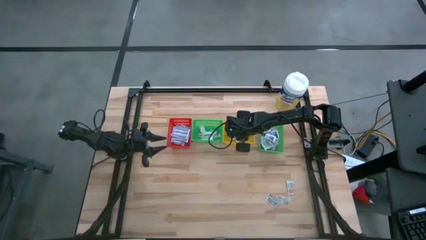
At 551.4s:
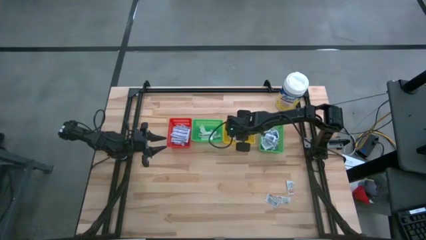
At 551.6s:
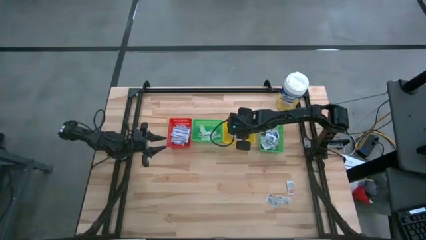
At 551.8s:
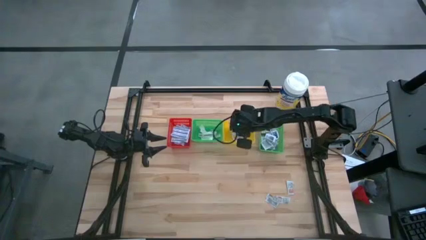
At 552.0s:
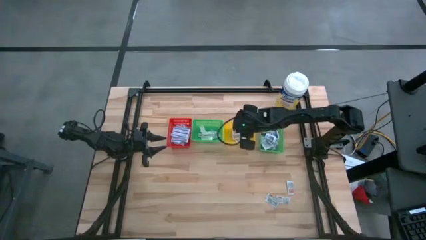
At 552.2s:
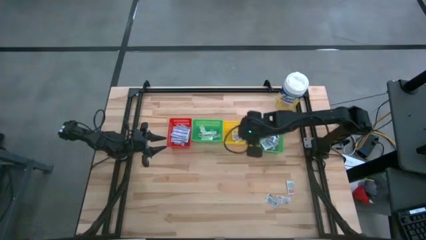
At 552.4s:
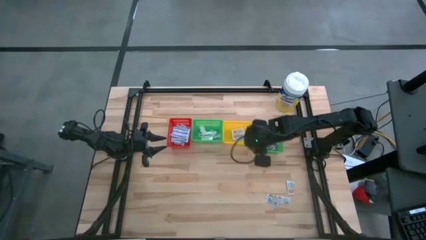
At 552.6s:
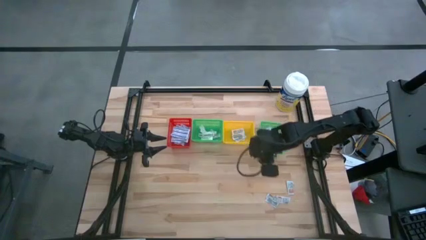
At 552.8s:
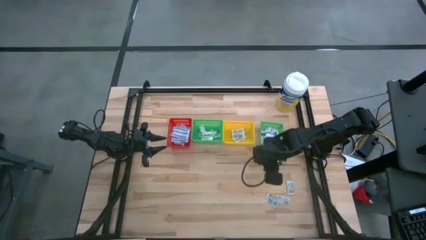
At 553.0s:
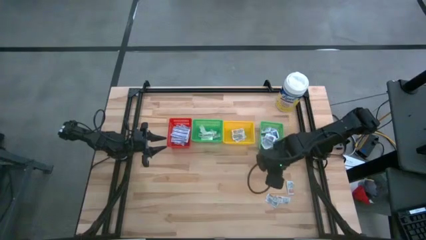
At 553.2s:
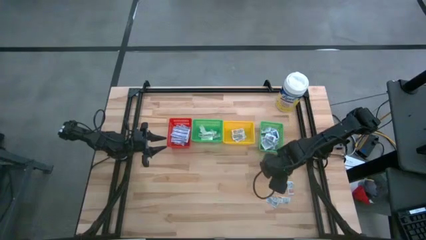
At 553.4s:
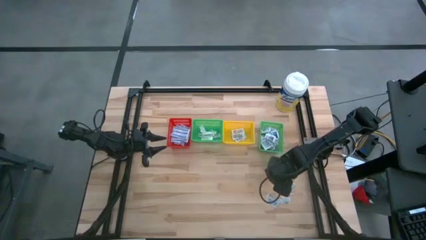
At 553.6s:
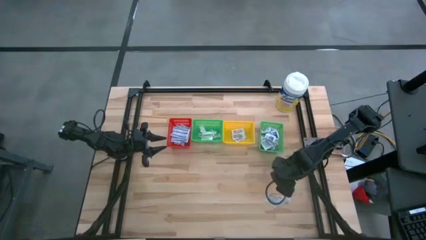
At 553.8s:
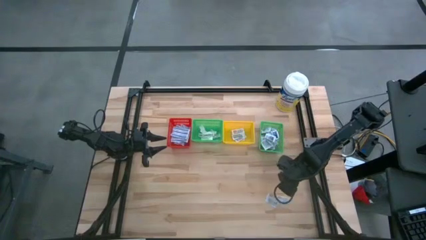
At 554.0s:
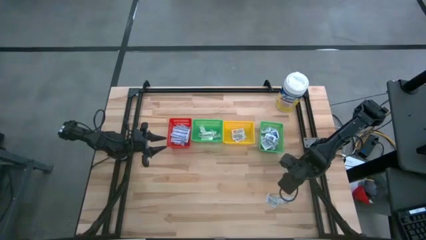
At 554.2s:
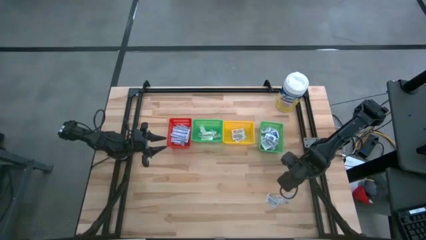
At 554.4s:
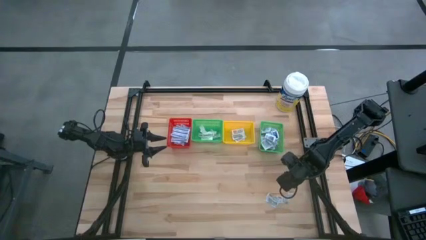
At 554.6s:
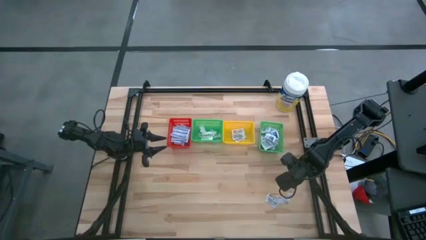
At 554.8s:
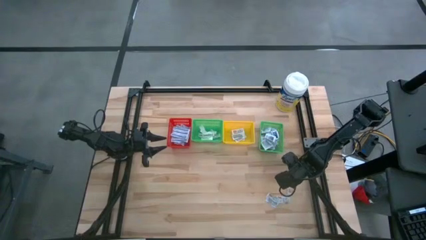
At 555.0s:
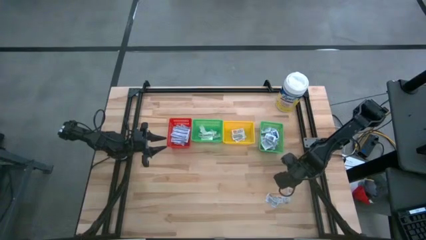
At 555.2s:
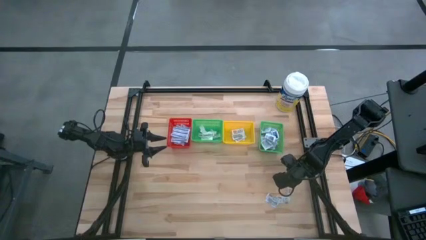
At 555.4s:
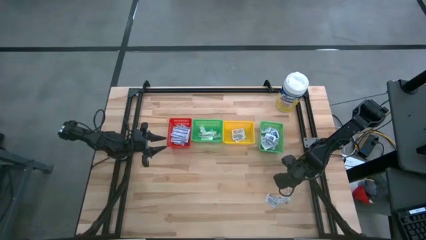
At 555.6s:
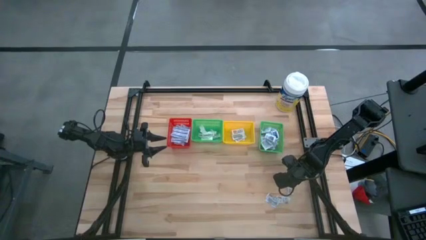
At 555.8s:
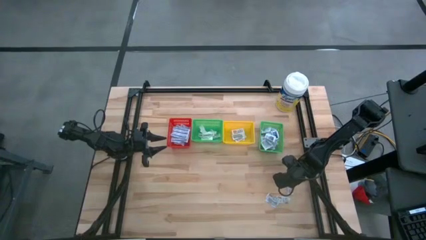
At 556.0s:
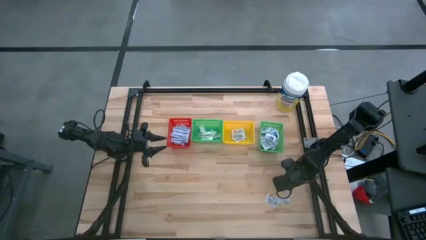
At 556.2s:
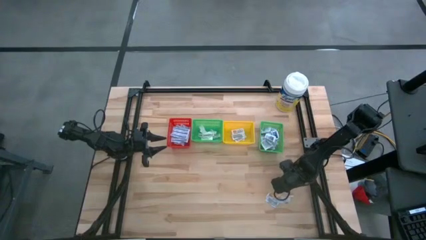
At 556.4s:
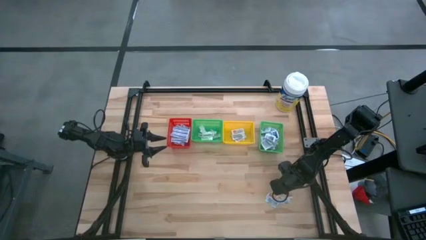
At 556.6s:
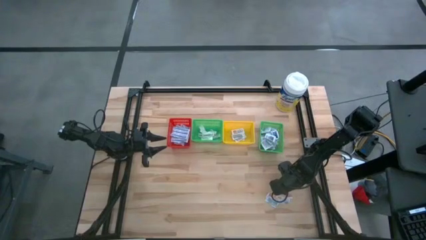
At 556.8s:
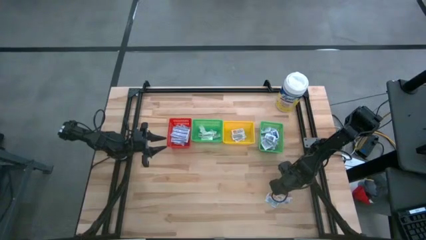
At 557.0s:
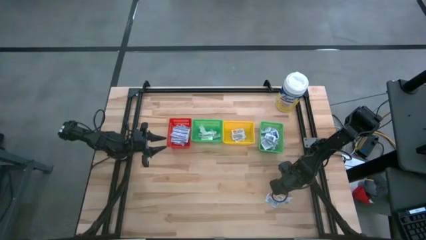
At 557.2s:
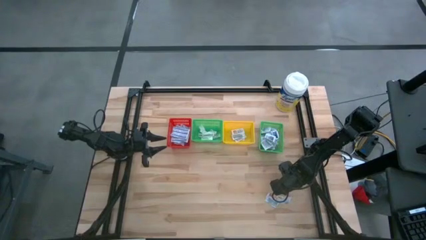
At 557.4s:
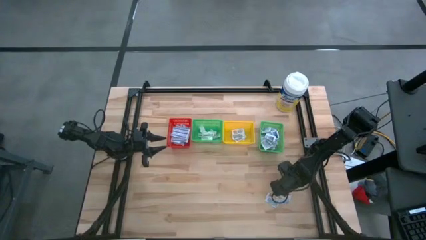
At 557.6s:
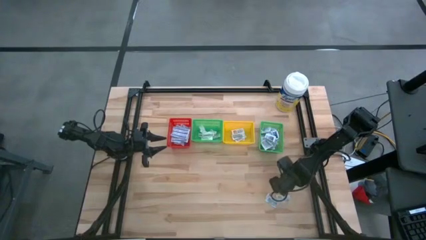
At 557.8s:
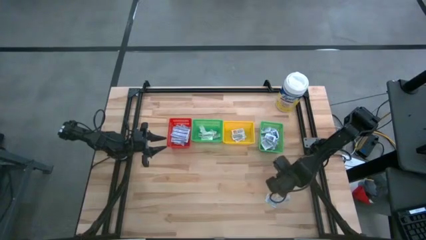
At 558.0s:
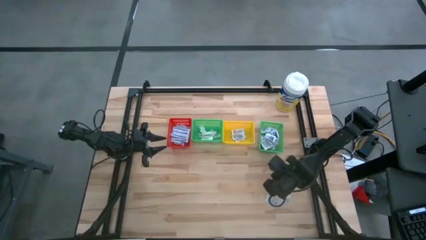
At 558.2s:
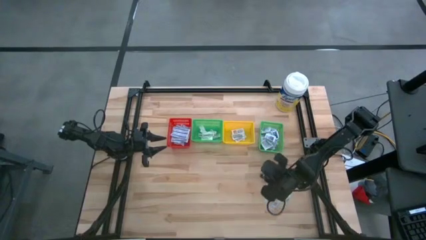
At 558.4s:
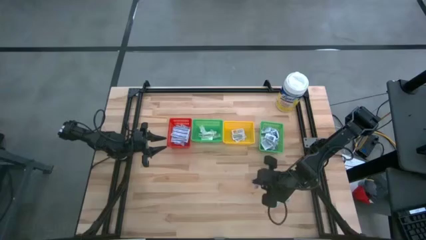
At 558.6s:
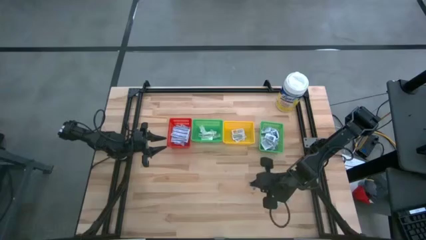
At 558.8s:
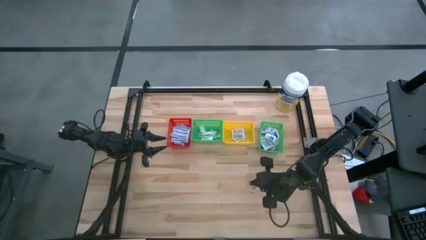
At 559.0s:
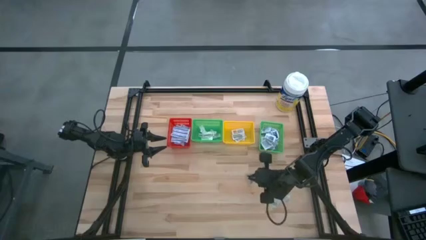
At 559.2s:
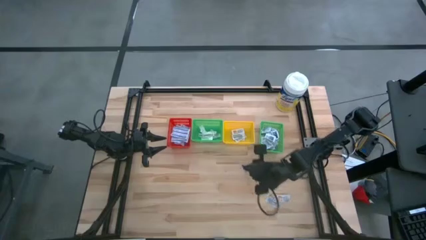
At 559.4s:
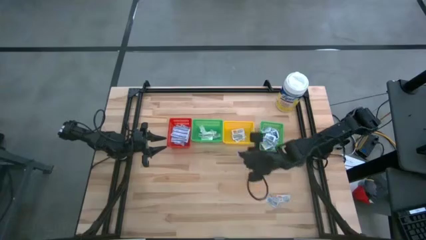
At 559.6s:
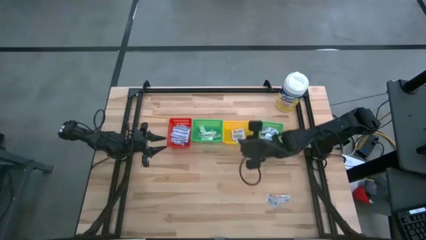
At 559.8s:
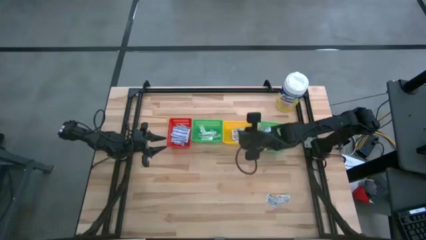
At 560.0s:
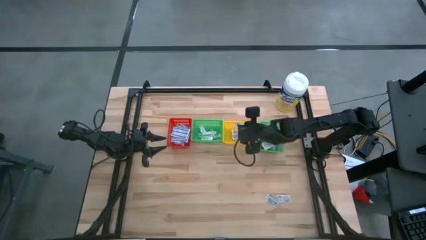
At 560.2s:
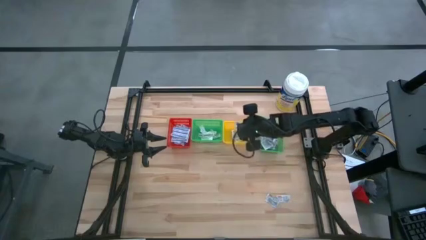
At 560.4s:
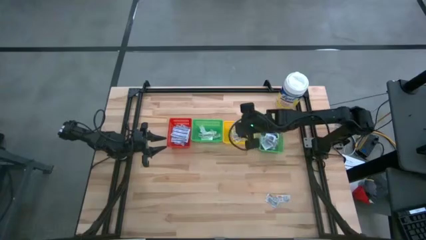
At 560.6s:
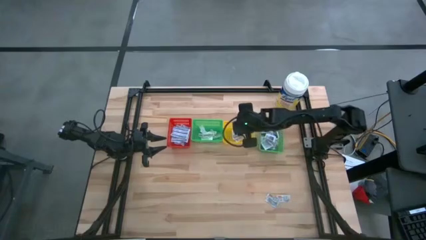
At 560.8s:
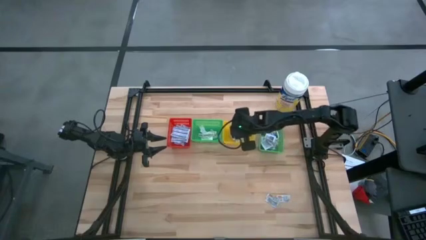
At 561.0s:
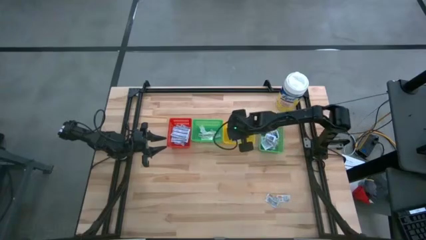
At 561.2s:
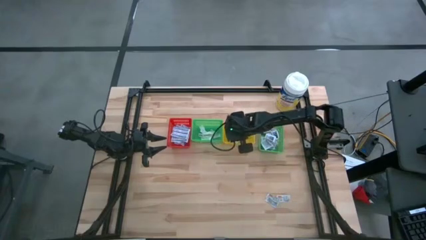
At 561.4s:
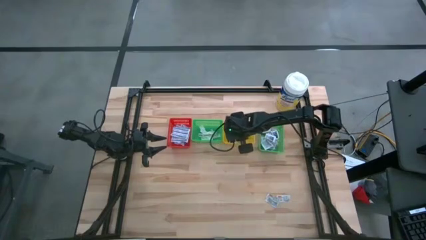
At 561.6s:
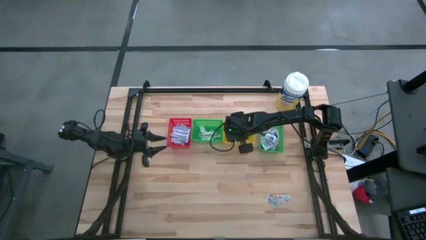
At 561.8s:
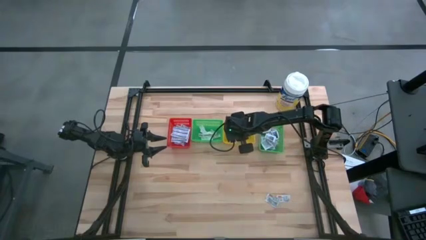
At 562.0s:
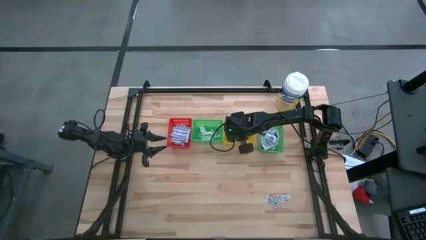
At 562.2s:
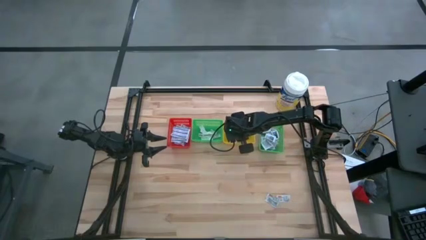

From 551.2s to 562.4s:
Task: Pick & Place First Aid Supplies
Put the orange ointment pack into the yellow bin

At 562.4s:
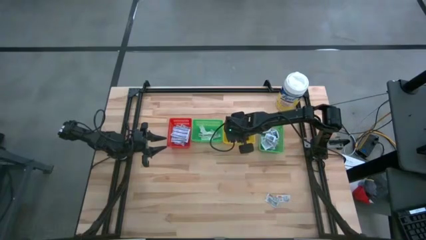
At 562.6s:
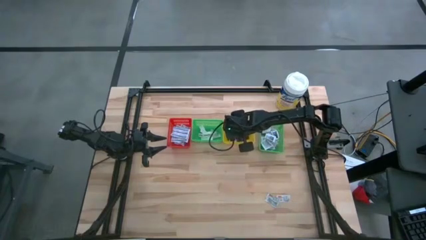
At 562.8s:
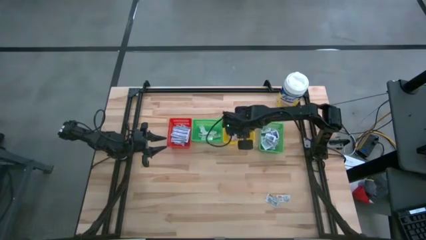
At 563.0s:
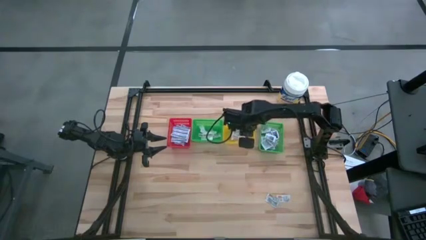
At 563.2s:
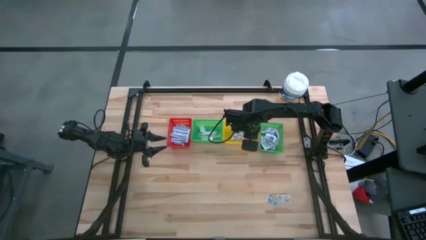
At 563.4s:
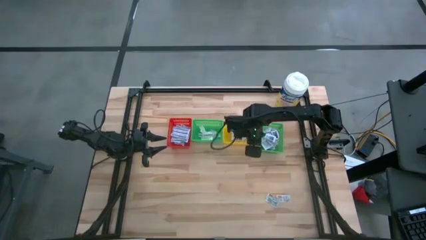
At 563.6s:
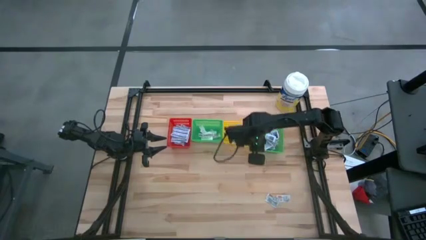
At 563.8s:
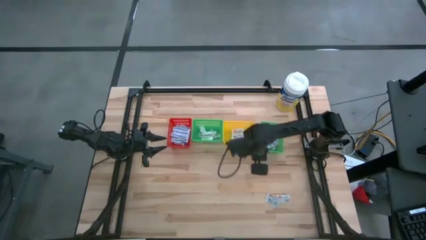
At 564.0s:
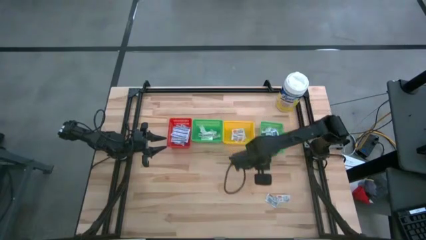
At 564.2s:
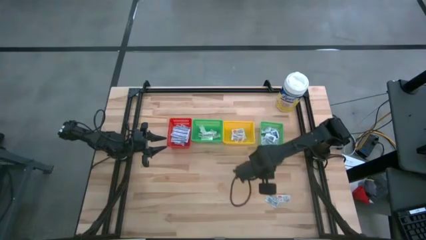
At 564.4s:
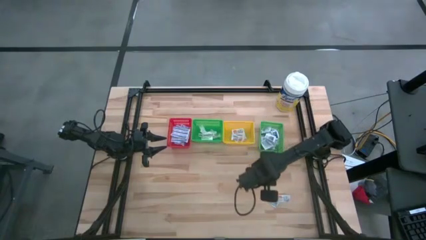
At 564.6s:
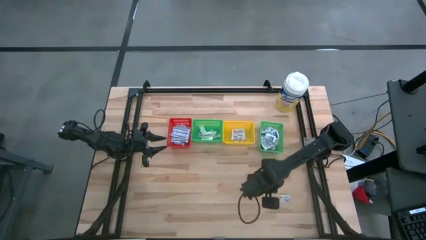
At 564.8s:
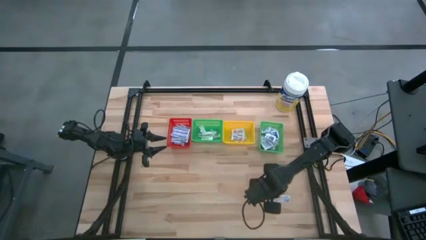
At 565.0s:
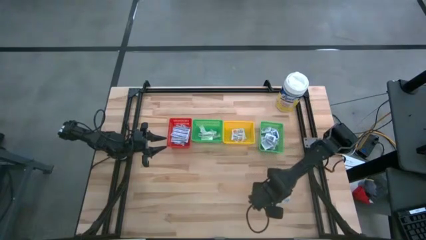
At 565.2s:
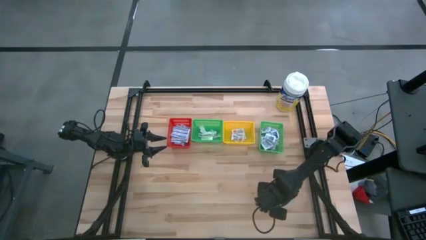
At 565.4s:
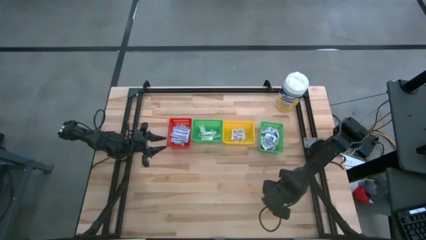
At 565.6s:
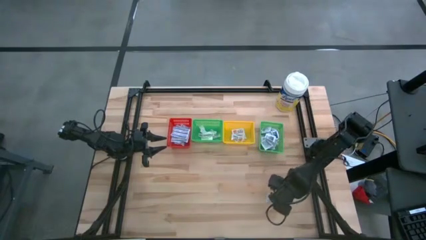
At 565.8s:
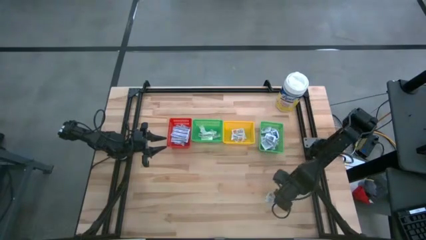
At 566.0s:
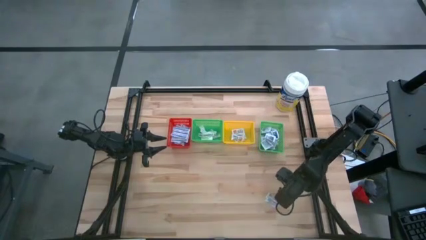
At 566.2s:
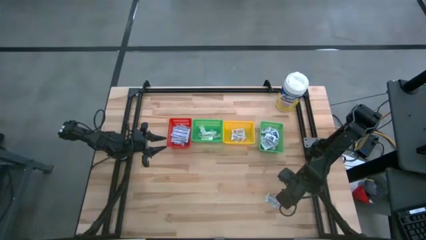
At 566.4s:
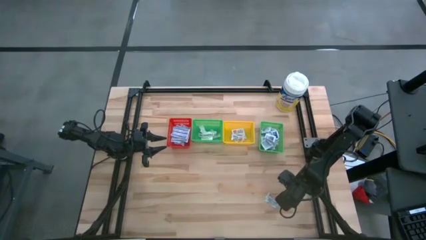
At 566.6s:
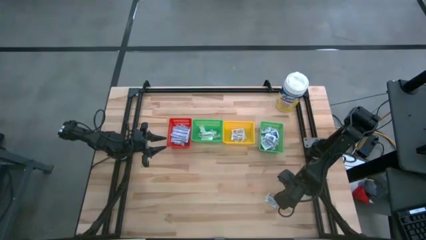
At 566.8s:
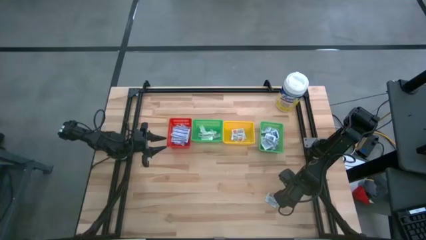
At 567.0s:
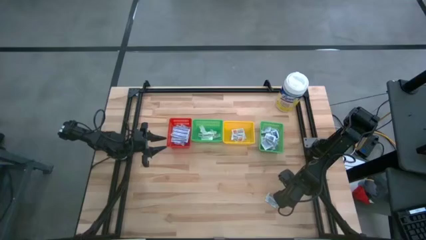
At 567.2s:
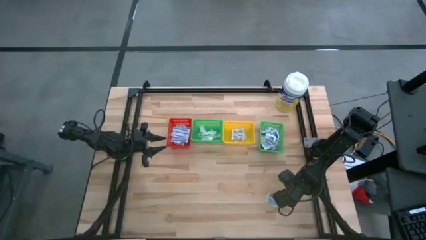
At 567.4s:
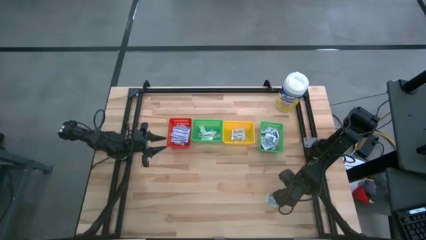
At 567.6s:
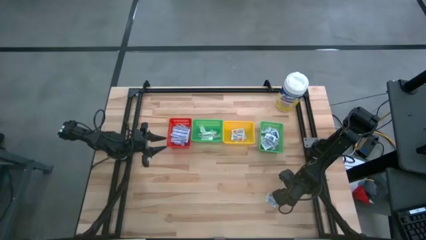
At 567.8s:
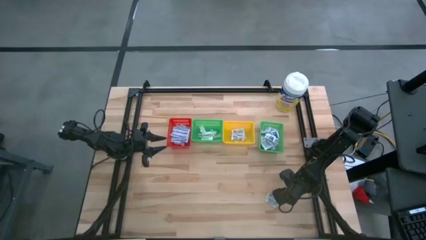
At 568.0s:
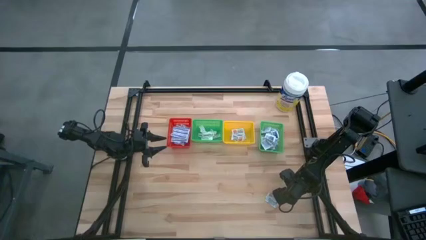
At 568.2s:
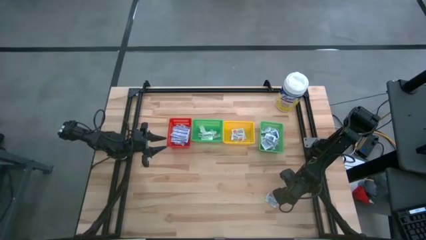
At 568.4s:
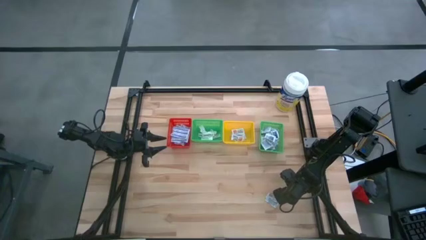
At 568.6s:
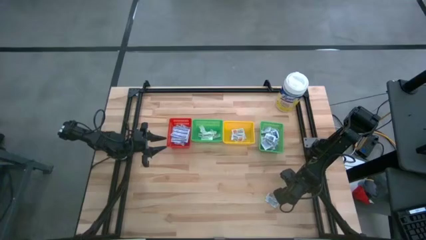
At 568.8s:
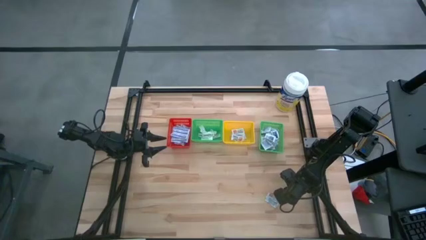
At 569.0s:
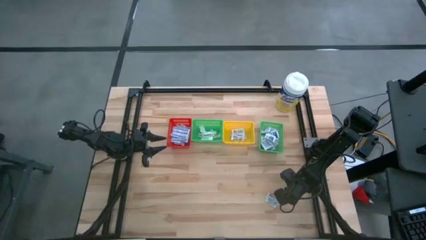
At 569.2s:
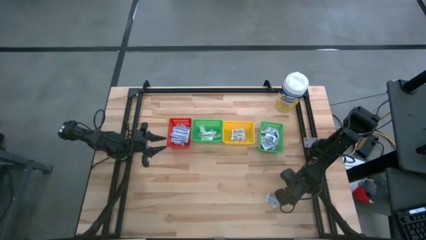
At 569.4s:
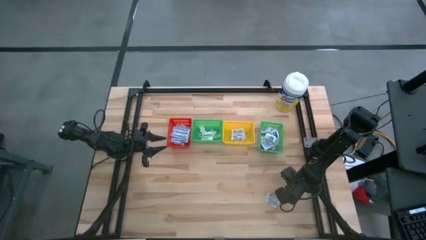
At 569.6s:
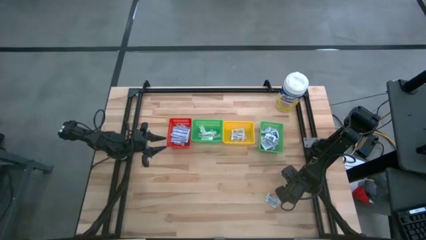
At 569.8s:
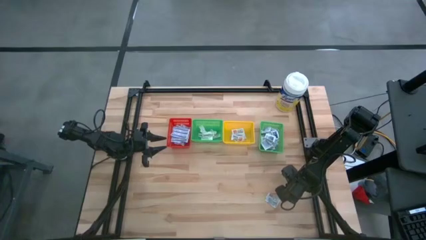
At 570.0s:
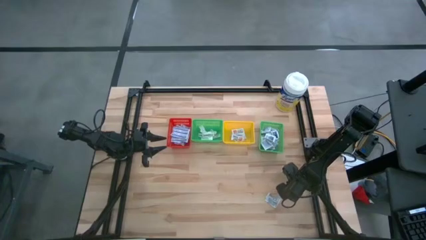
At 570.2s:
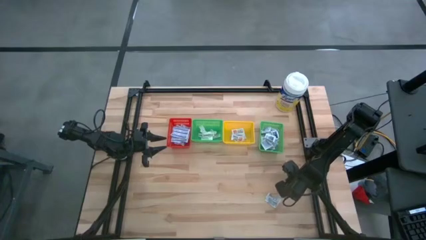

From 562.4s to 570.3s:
Put the orange ointment pack into the yellow bin
